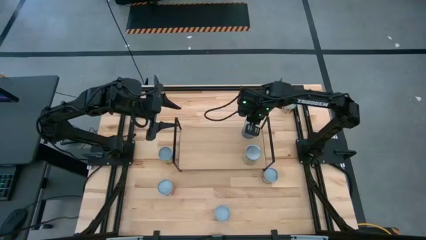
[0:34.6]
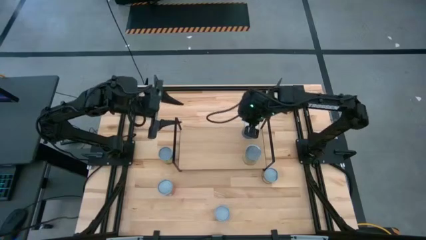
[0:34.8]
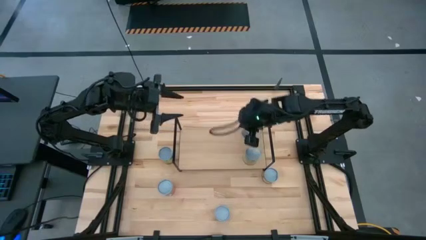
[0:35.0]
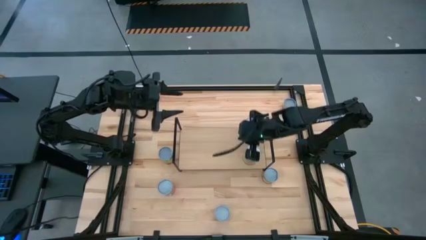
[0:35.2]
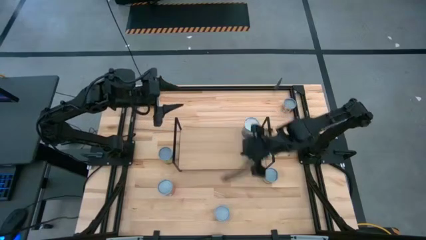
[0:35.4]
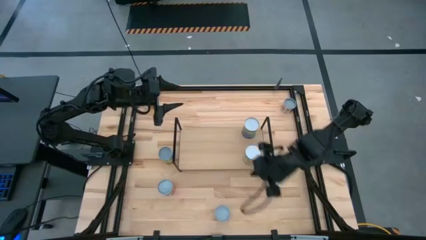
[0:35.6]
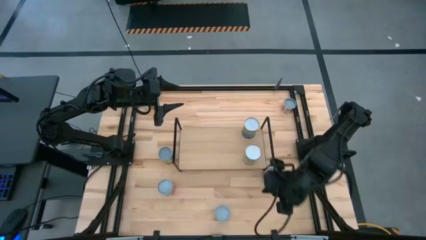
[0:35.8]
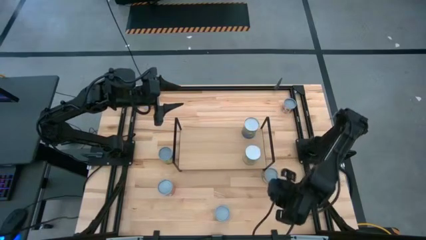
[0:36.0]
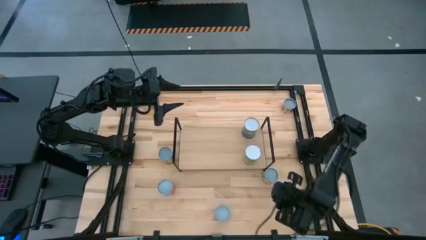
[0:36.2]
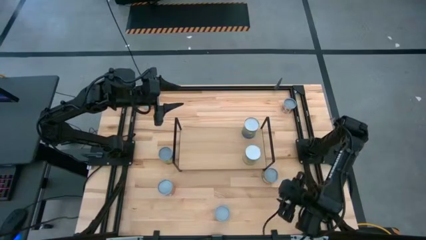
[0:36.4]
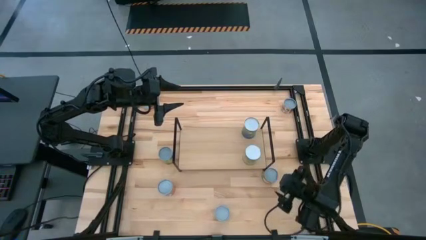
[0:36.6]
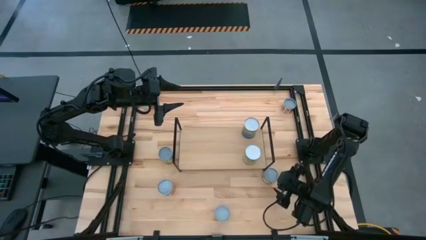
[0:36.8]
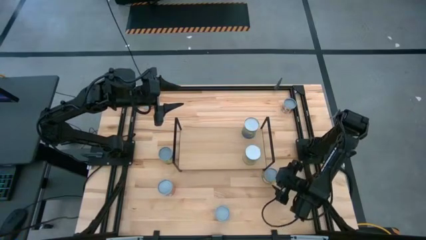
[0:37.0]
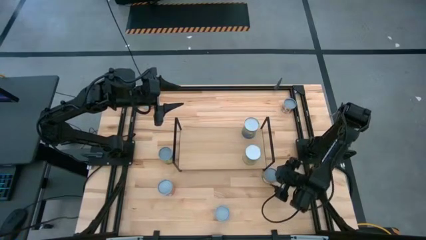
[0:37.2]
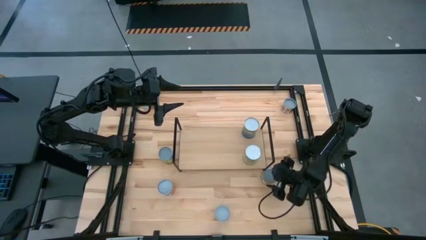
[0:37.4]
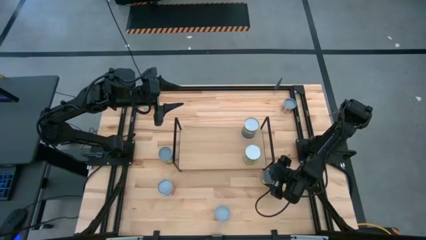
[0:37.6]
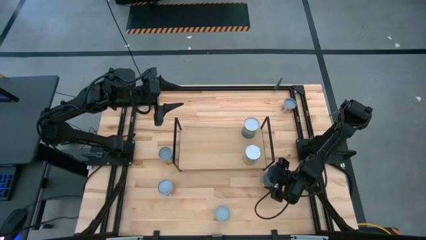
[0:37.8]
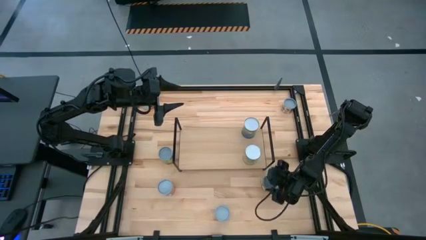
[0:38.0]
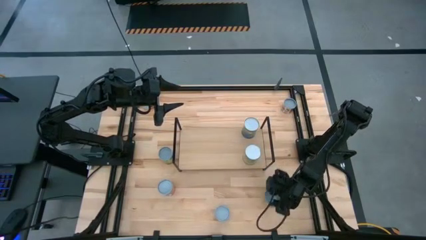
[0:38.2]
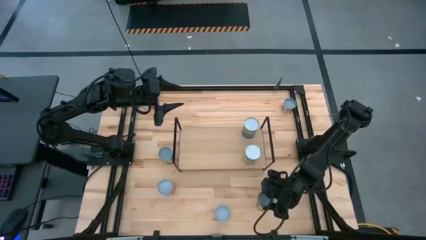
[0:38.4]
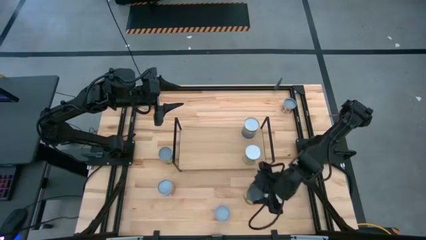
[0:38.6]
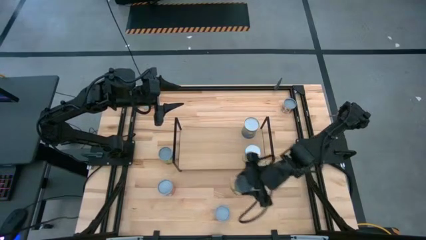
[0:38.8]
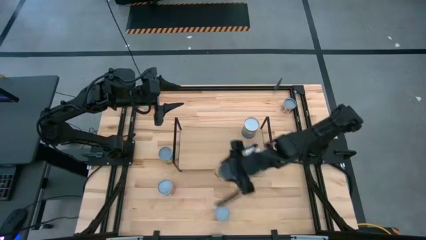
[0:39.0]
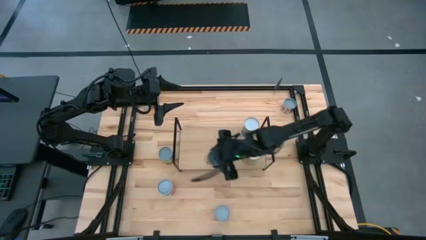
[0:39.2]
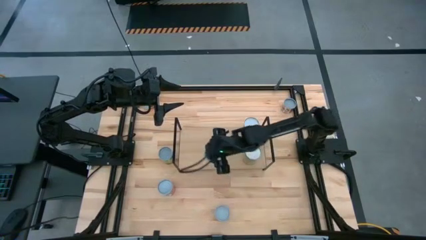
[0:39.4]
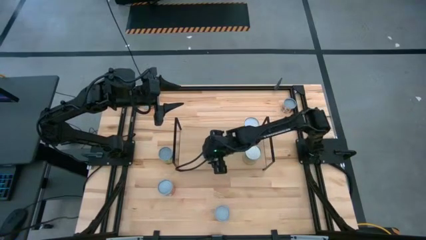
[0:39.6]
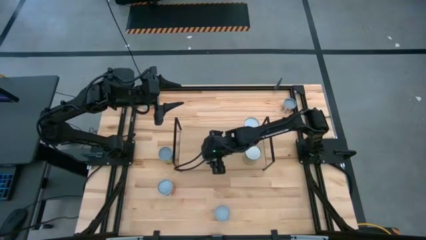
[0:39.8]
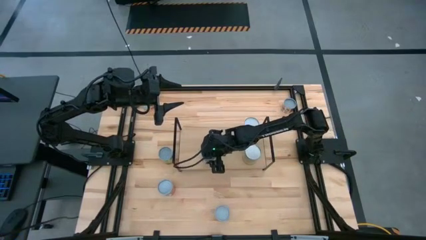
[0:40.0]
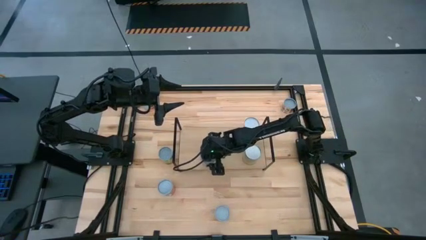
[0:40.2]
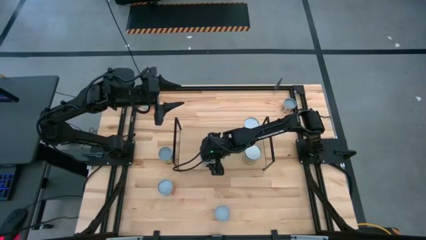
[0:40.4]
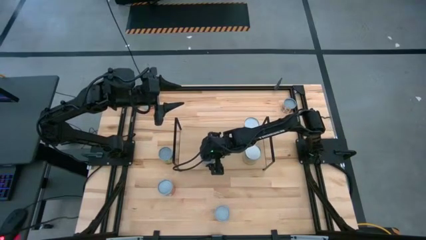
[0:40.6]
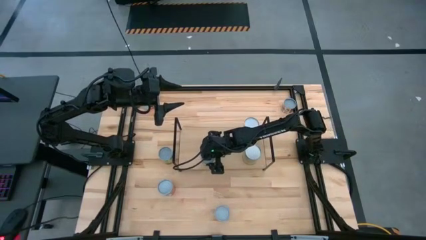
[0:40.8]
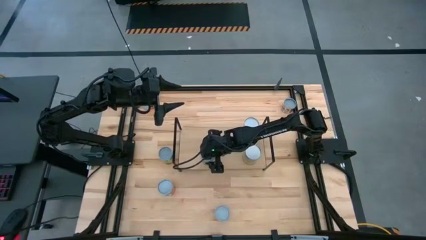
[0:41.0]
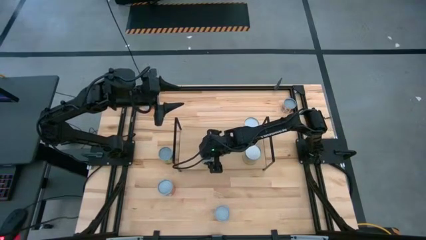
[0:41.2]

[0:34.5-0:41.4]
Task: Pick and place cans onto a shelf
Put the canned sliced peaches on the shelf

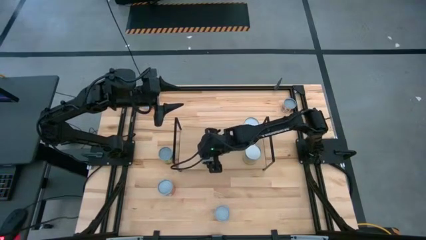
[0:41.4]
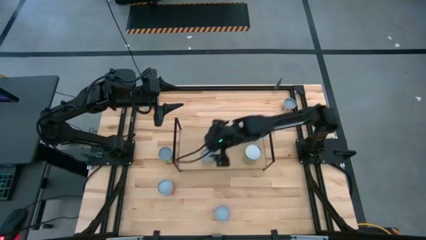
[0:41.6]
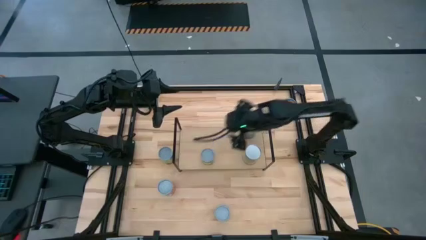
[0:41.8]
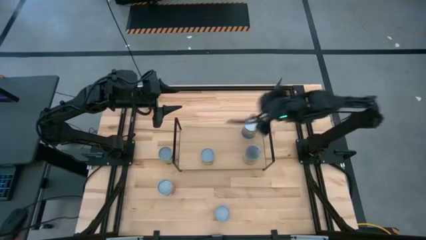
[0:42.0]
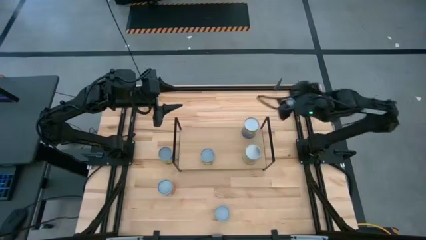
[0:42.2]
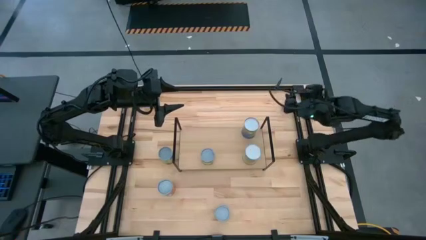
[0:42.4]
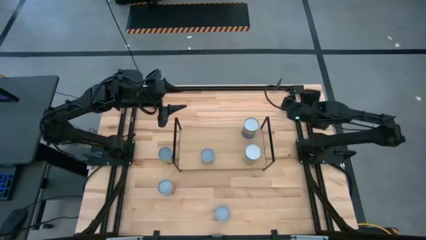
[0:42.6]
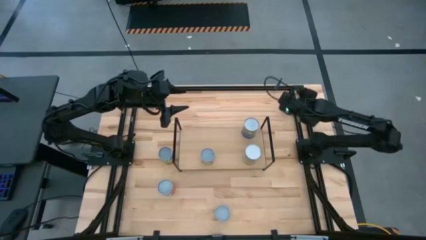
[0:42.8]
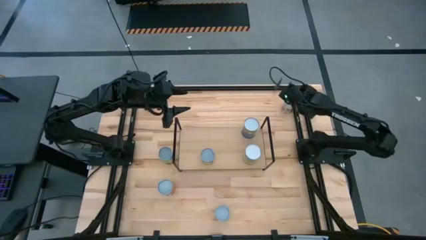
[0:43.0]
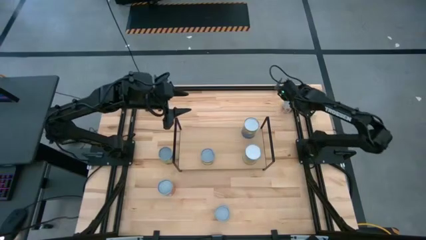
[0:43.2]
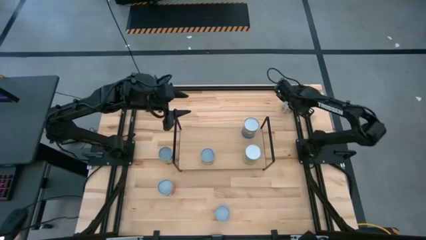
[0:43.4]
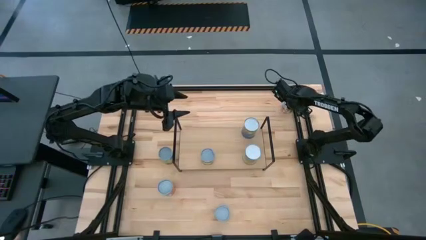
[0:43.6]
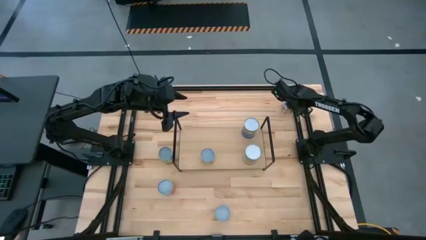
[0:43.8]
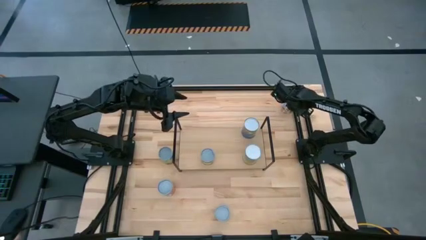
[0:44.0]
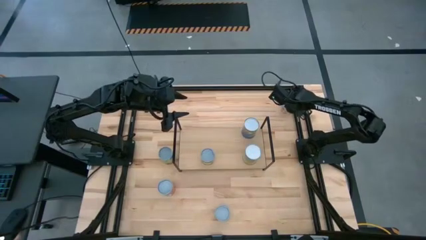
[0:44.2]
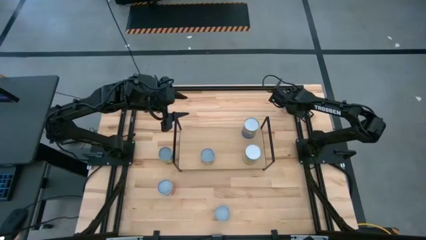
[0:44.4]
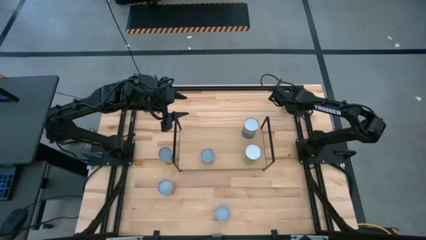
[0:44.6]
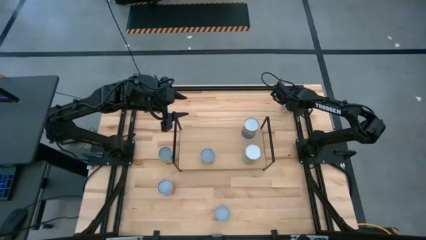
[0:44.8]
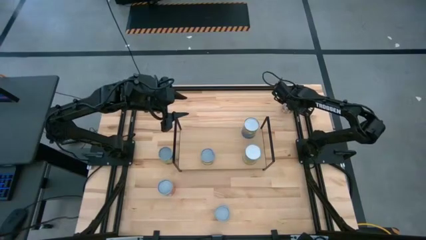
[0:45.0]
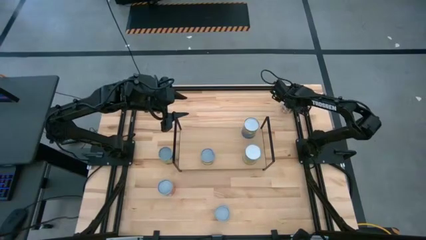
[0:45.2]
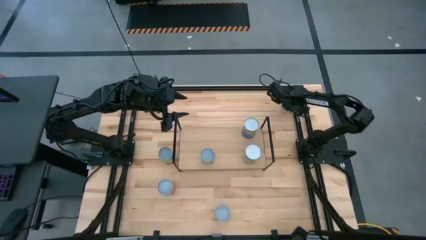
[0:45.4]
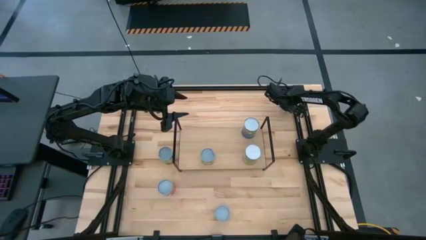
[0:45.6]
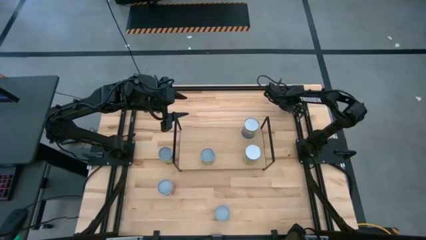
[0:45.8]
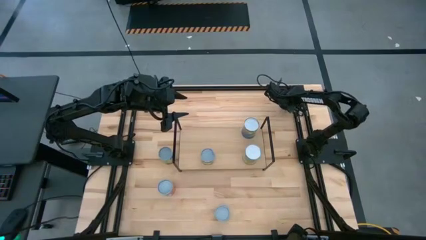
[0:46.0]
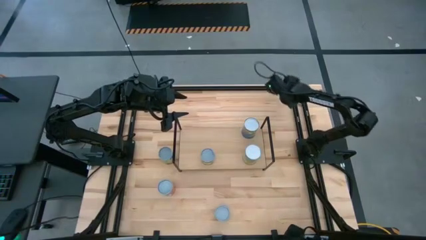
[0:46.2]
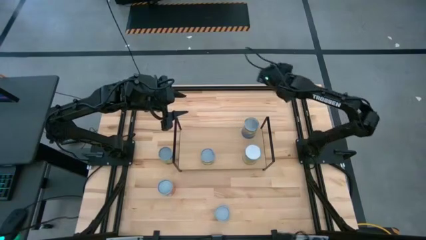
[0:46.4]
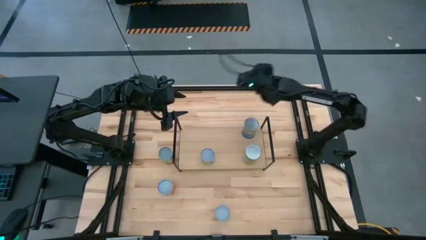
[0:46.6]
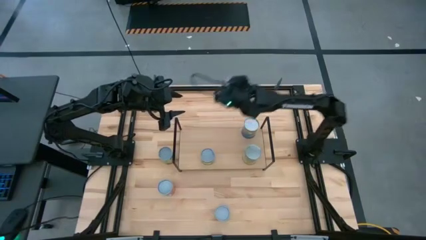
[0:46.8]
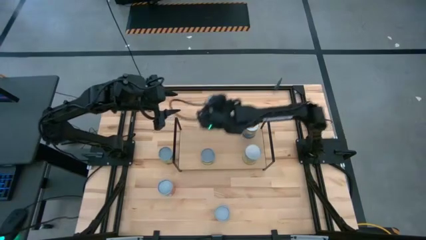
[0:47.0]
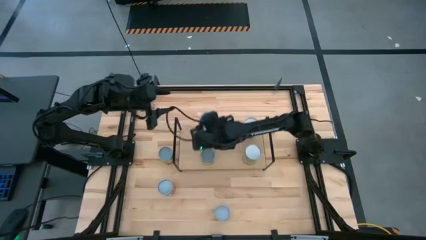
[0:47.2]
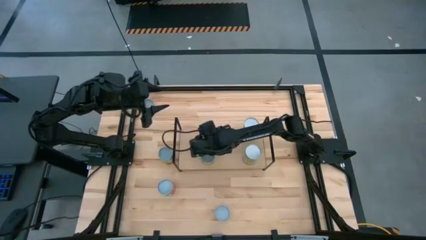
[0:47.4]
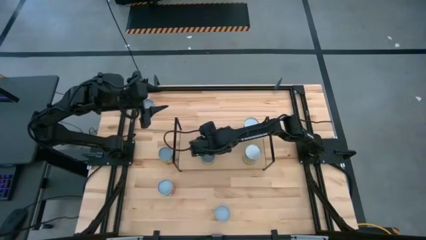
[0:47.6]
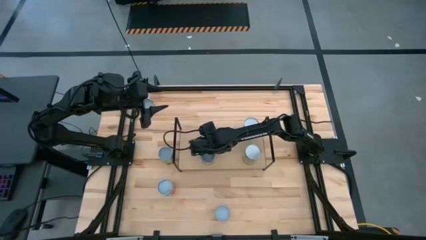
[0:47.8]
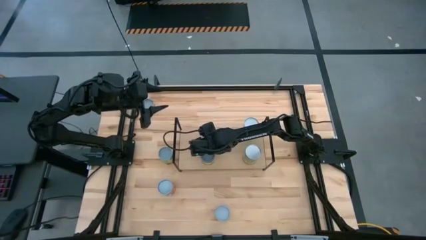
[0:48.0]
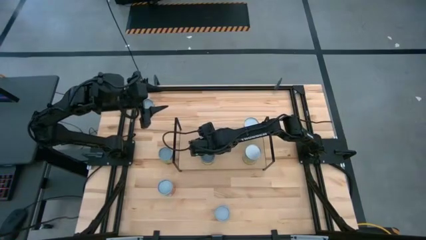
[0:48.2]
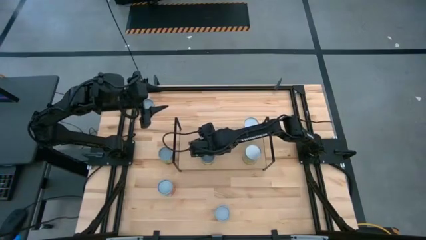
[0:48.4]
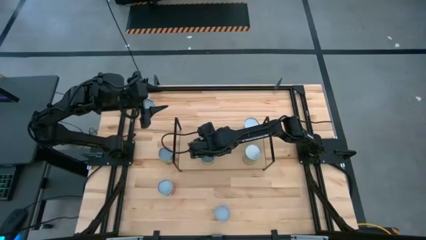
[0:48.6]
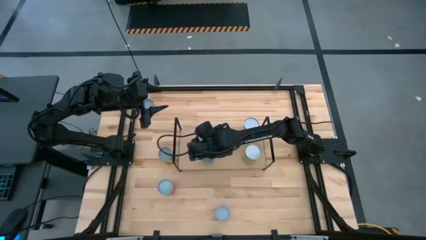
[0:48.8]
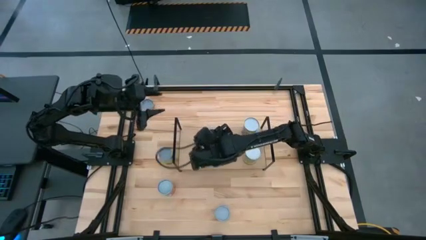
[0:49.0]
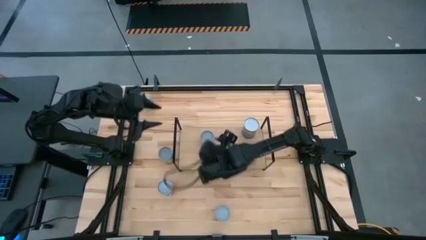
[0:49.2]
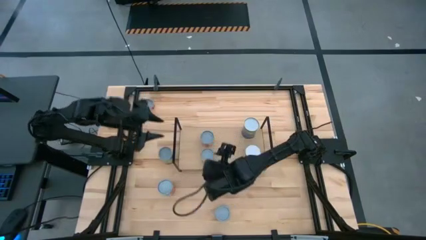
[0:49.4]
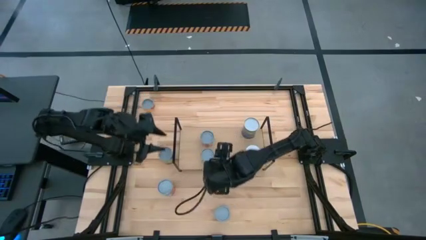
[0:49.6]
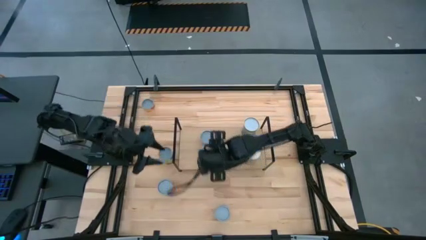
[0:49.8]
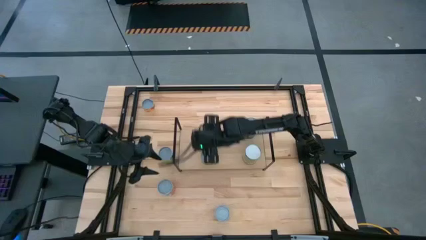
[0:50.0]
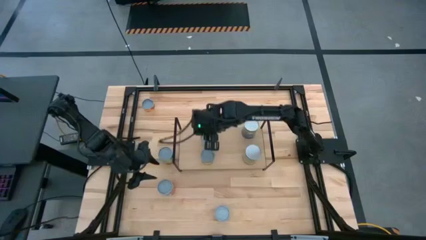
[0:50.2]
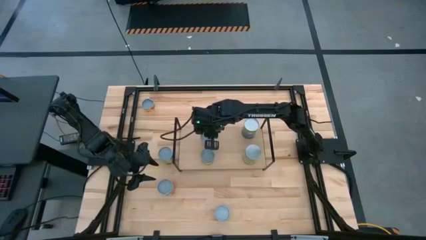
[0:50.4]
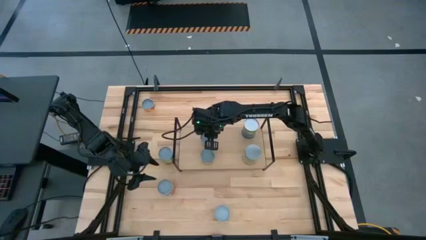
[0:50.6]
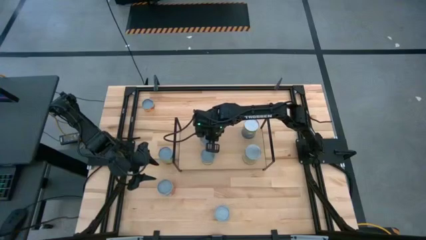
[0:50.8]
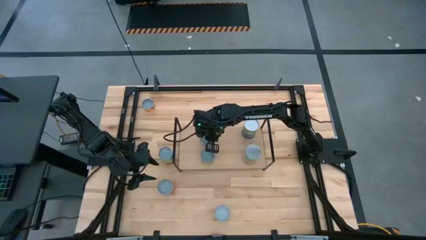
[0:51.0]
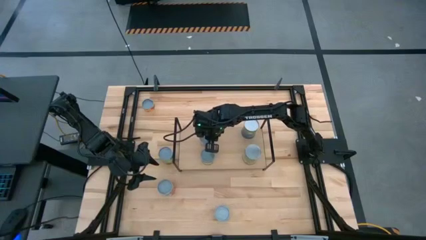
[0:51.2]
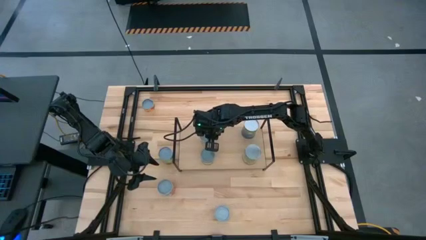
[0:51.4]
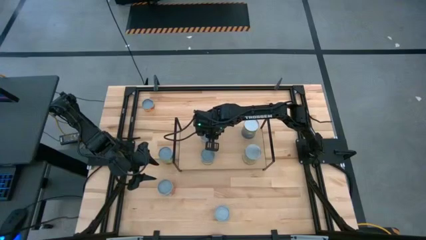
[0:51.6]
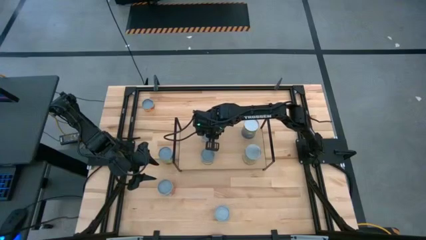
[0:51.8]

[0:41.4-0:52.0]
Put the canned tomatoes on the shelf
